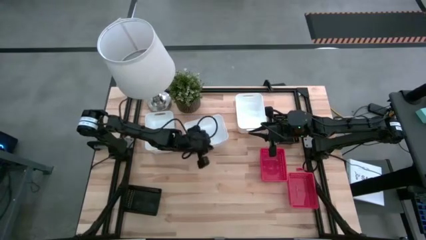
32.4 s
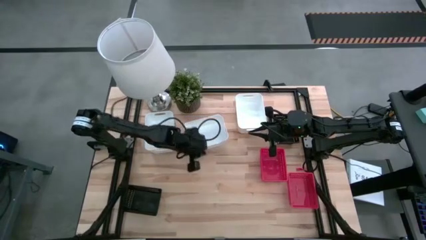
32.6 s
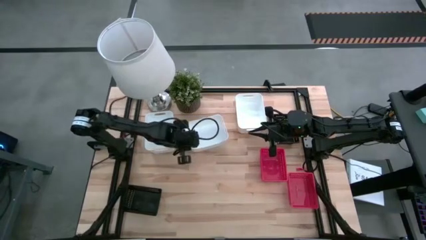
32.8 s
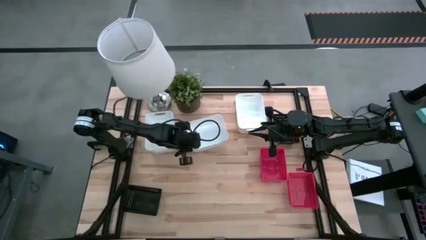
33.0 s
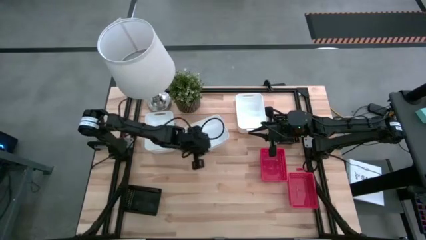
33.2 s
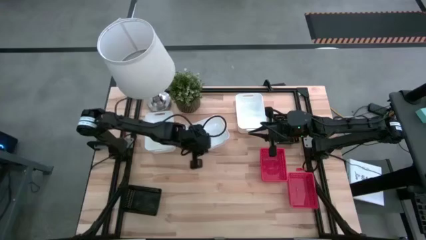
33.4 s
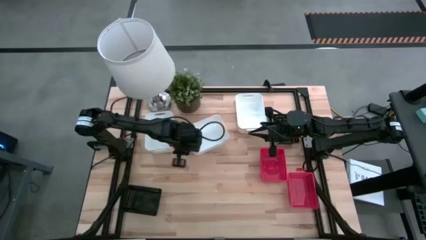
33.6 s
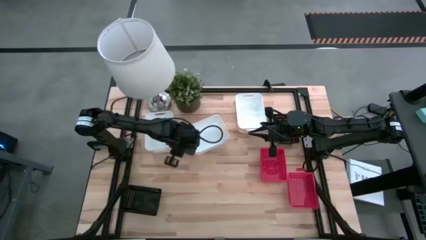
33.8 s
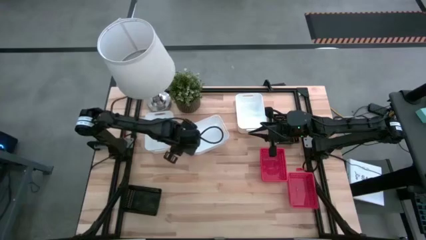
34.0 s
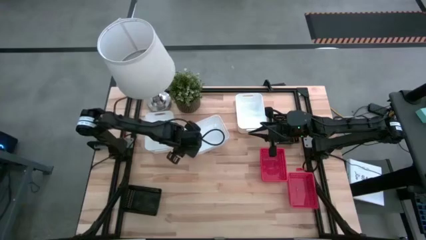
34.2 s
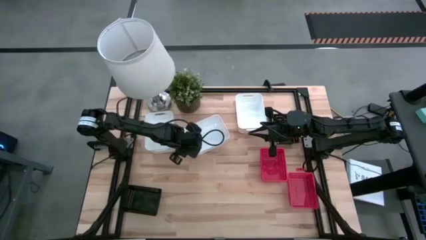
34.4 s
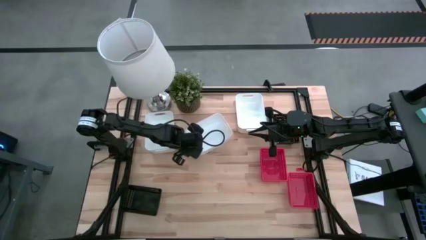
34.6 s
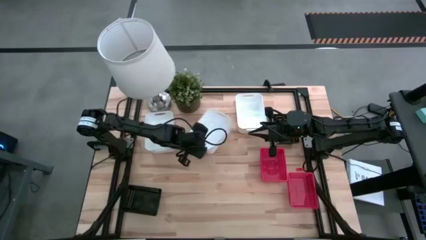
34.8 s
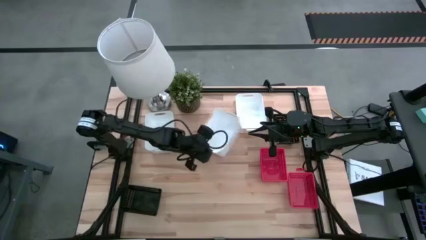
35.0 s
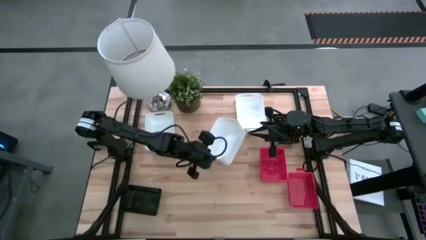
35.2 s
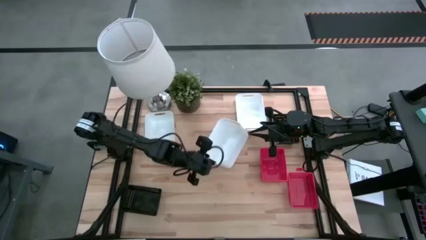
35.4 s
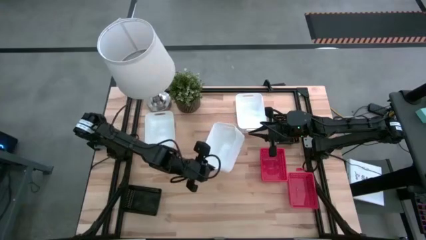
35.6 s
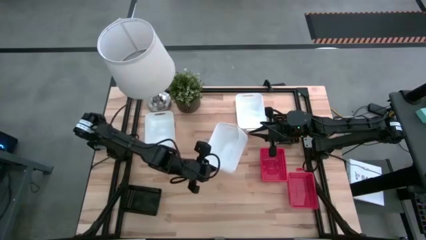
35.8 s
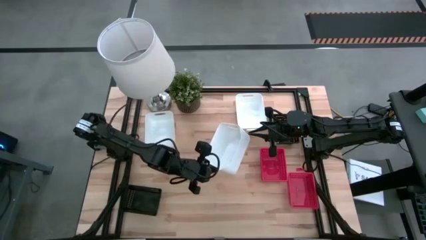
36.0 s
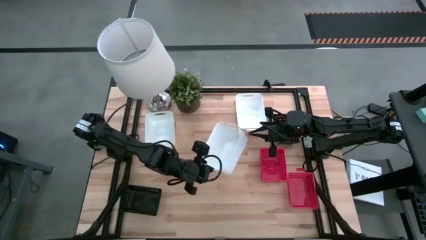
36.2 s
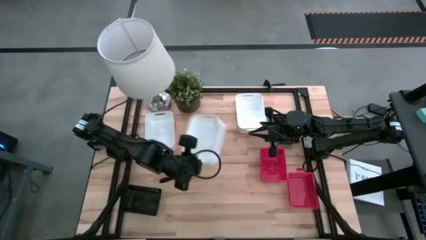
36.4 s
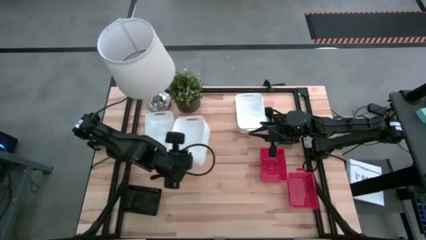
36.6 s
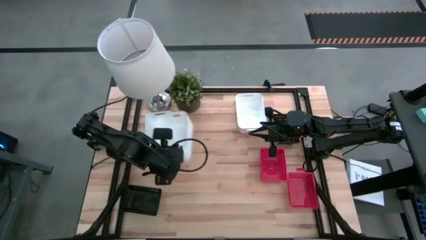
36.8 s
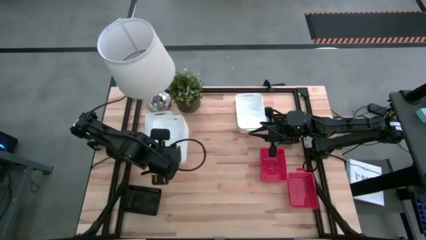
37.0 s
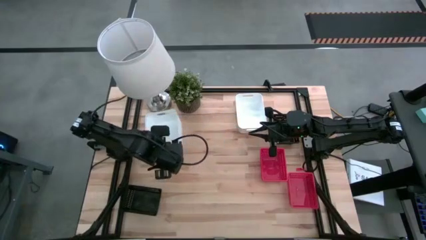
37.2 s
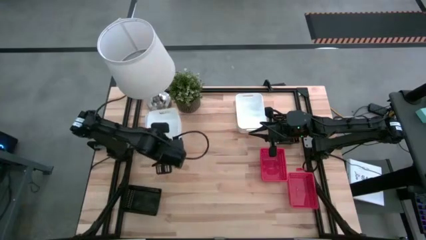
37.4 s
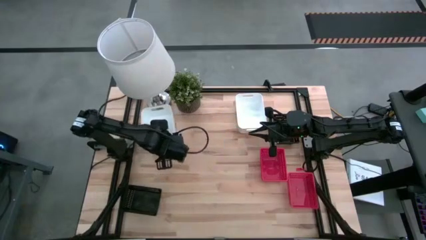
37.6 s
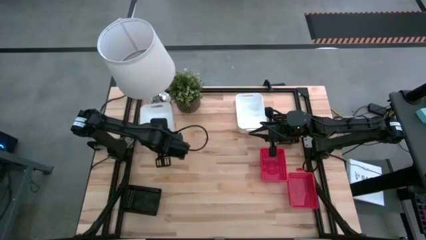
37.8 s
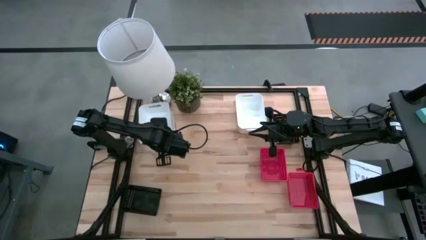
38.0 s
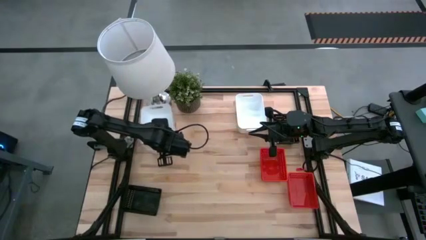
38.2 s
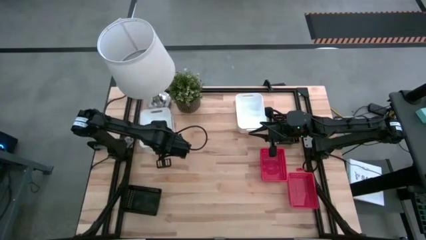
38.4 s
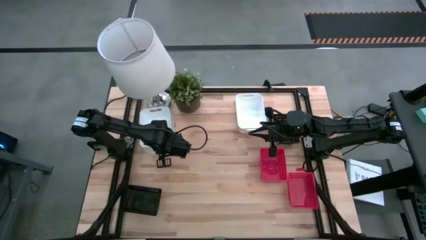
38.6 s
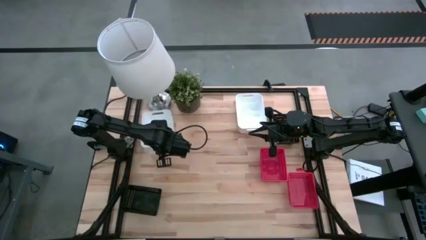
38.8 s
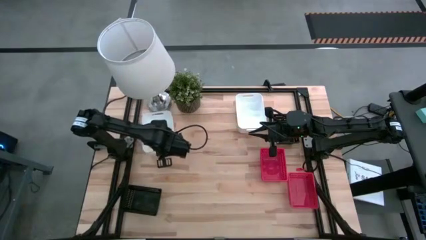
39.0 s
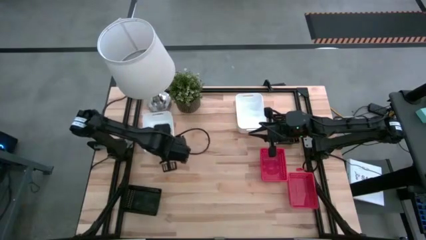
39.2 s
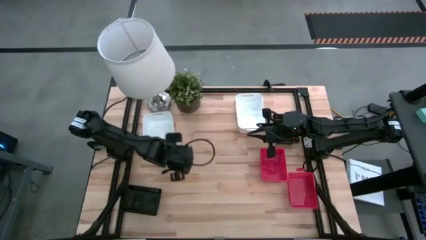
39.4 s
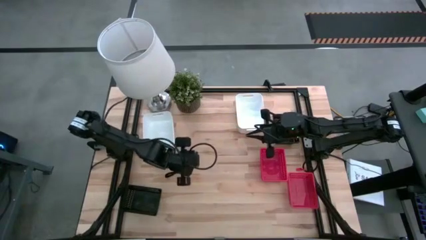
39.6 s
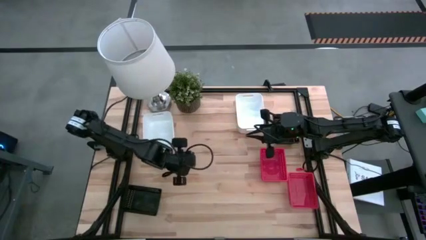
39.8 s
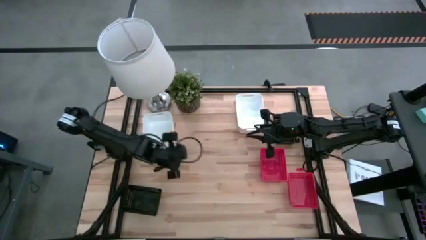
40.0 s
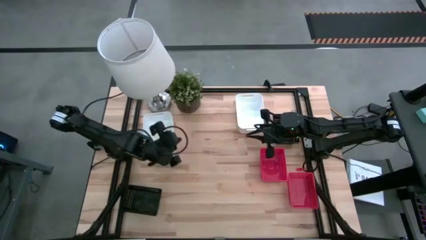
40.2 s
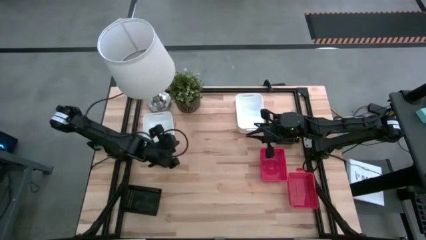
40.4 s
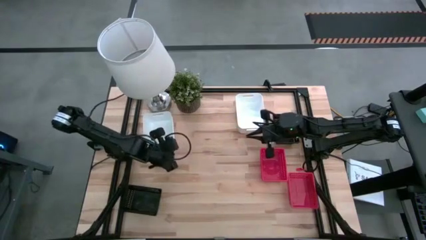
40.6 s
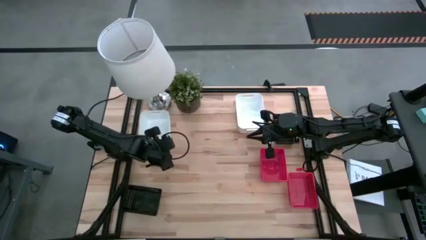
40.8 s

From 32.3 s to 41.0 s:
Stack the middle white bin on the left white bin

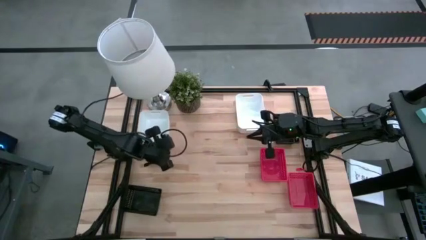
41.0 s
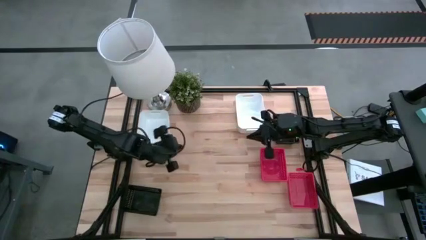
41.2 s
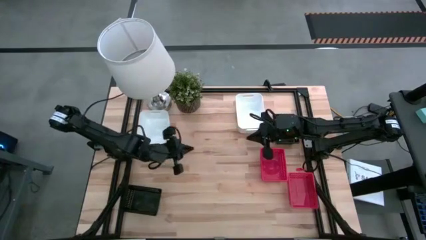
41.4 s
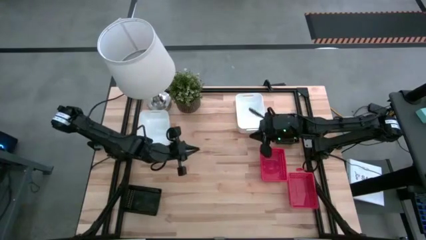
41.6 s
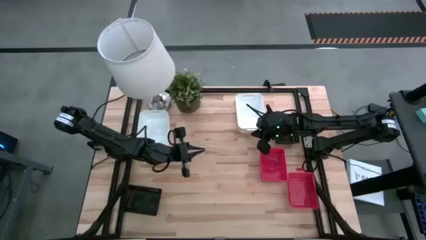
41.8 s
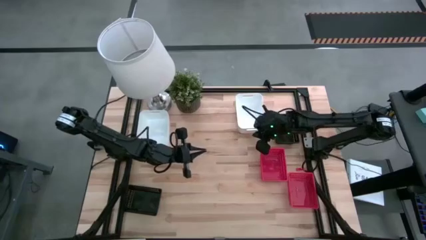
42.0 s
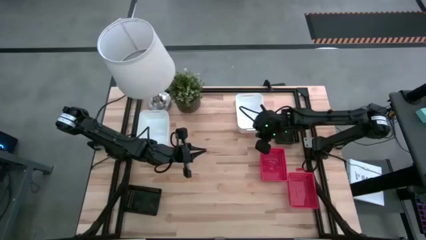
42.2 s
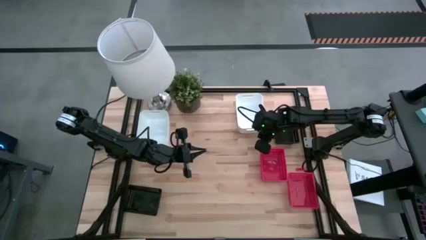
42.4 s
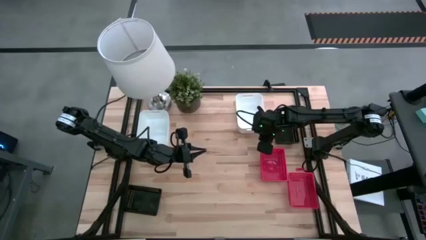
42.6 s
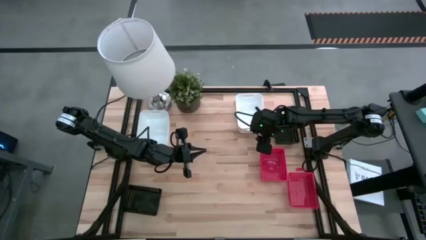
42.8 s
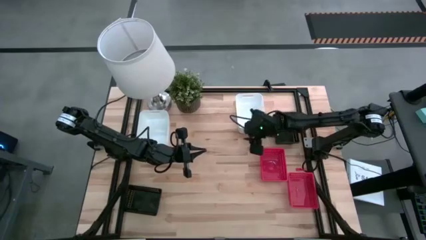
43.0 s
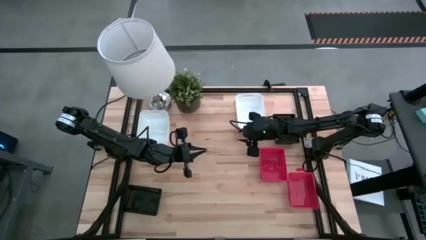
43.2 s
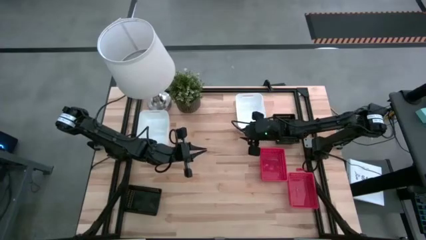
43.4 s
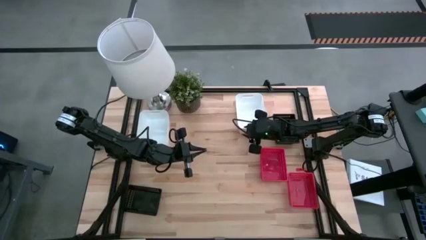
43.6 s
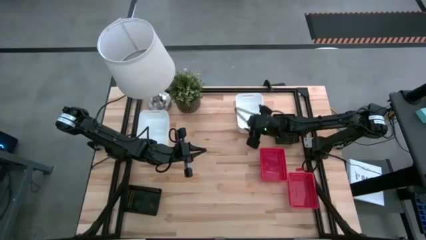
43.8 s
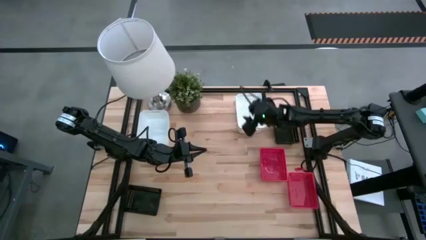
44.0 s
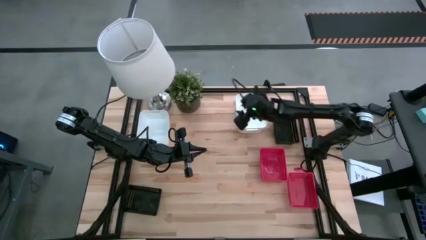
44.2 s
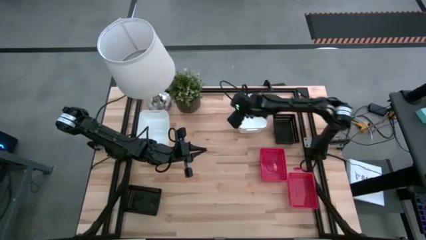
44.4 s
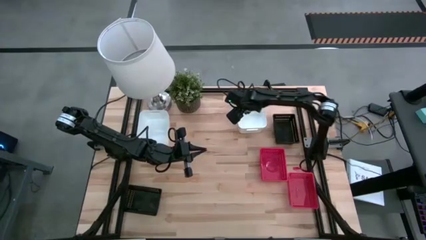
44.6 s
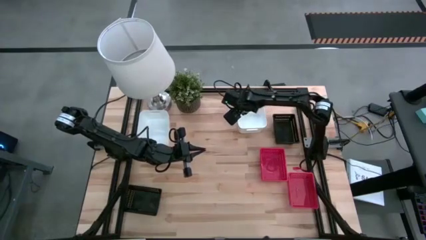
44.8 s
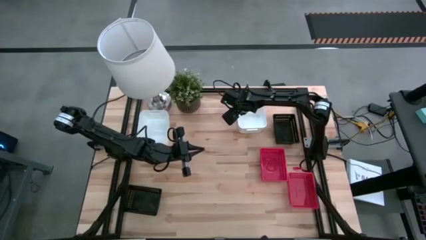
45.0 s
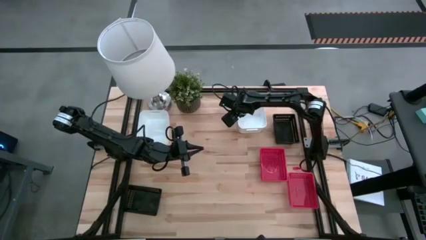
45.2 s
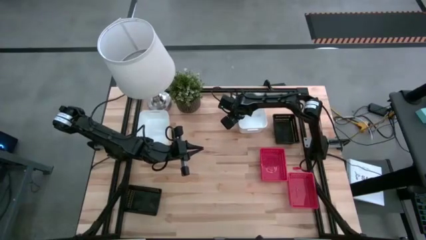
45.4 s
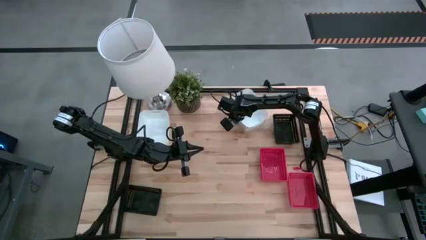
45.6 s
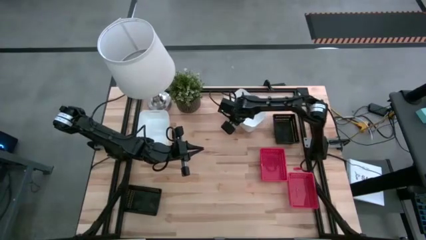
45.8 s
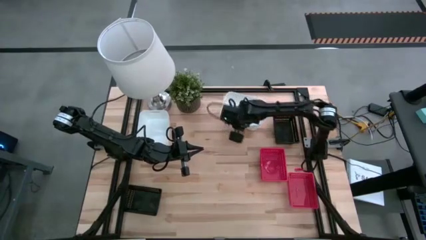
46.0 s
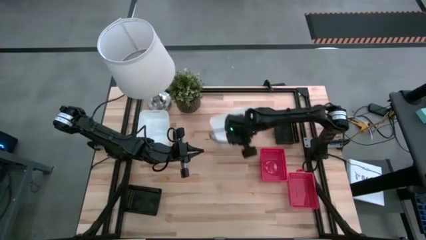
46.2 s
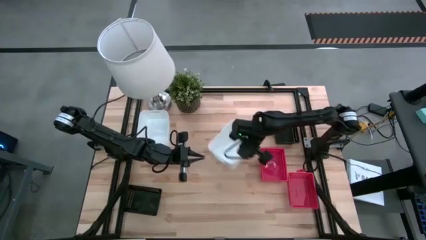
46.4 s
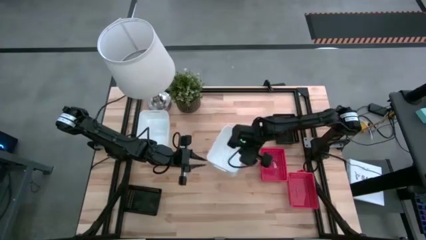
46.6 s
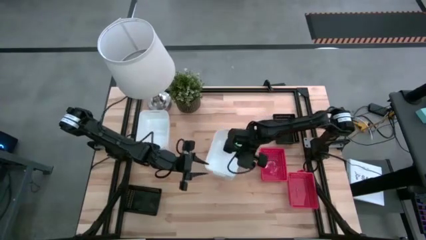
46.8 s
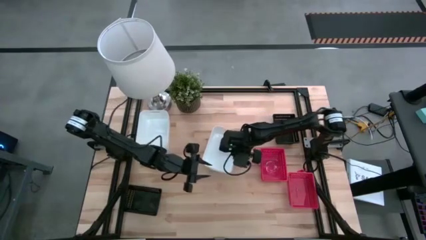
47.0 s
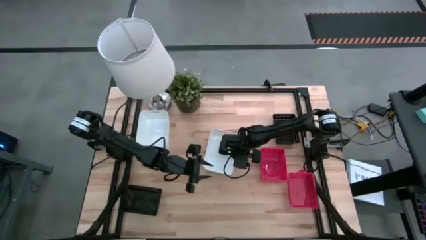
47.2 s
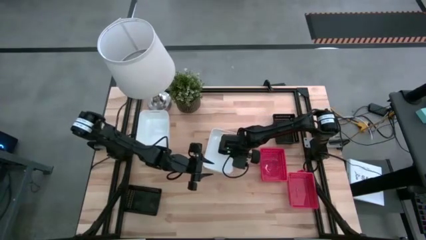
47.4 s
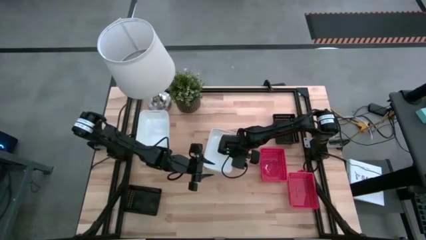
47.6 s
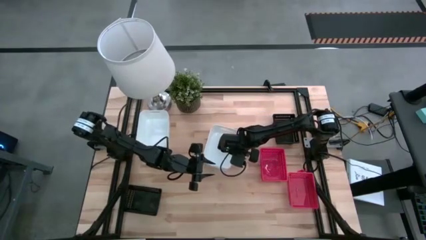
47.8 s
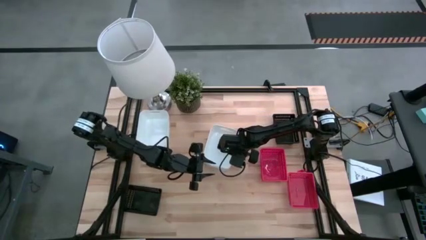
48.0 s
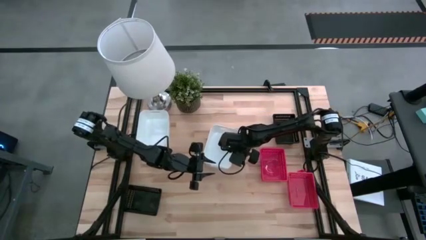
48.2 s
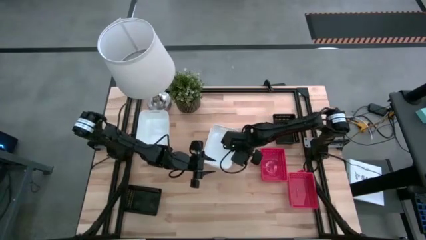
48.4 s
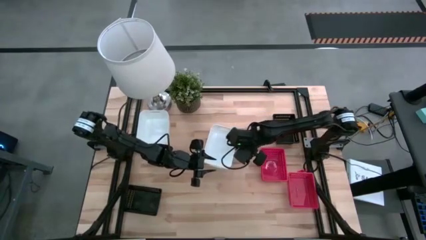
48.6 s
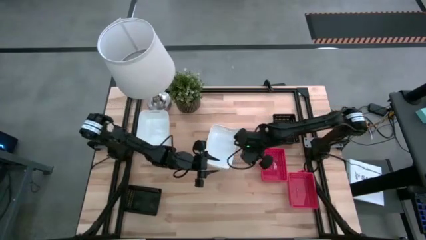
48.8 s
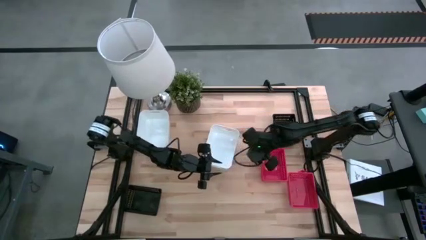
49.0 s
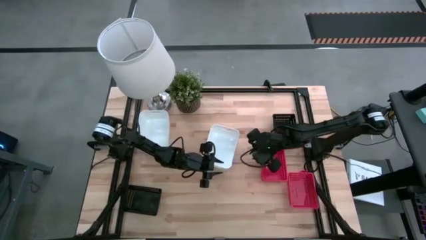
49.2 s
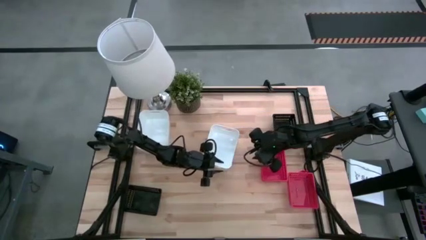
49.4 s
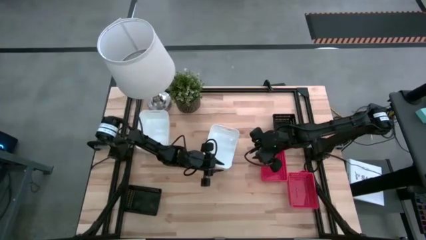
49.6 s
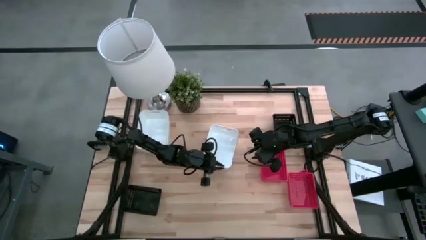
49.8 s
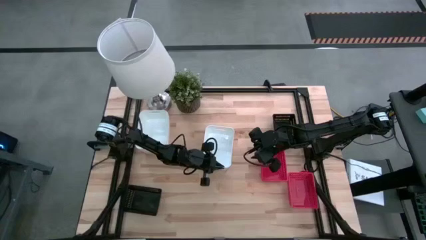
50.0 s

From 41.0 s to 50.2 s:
Stack the right white bin on top of the white bin
